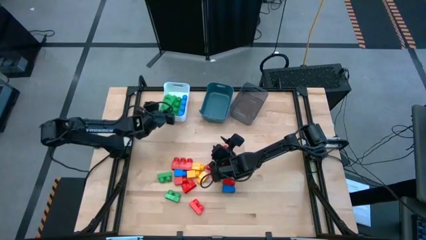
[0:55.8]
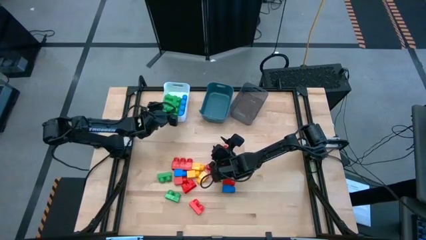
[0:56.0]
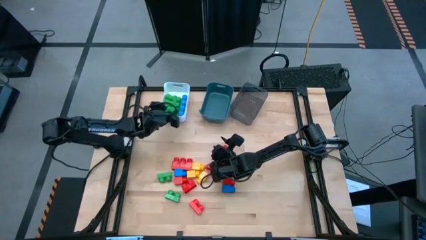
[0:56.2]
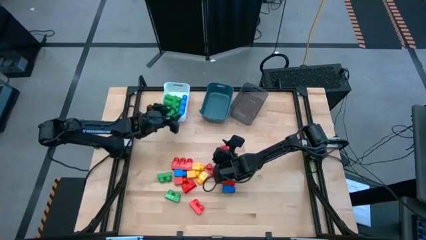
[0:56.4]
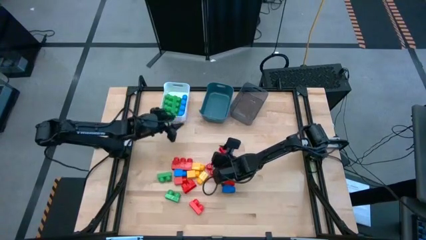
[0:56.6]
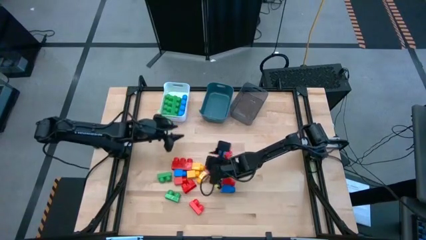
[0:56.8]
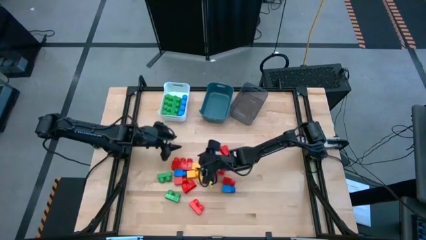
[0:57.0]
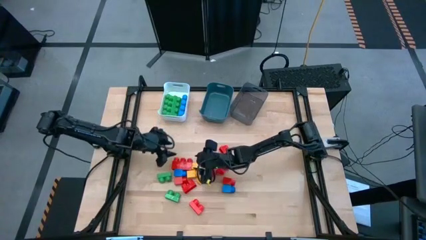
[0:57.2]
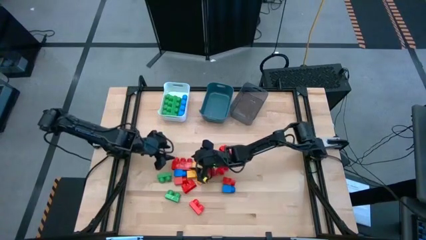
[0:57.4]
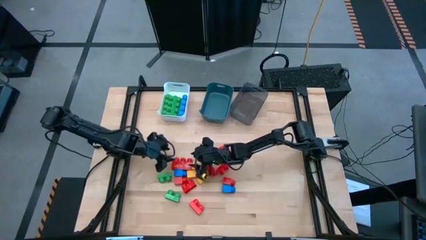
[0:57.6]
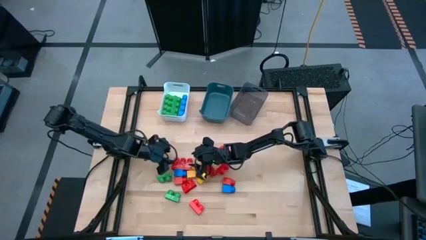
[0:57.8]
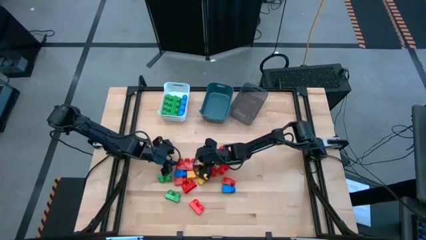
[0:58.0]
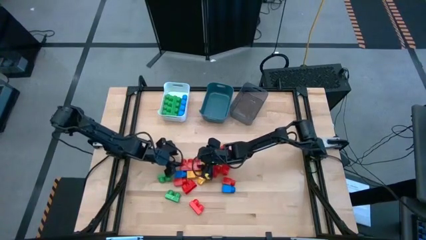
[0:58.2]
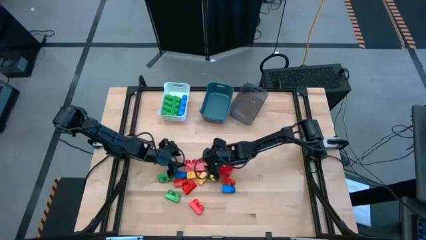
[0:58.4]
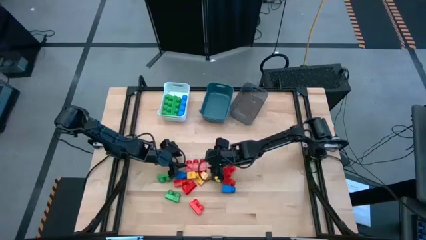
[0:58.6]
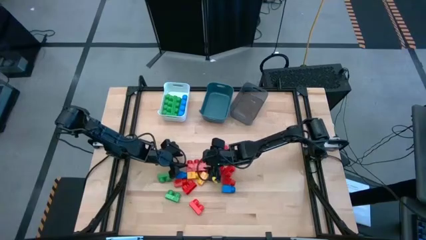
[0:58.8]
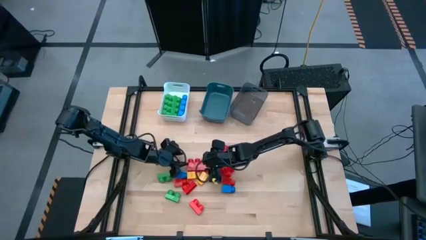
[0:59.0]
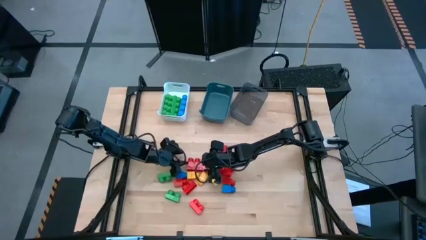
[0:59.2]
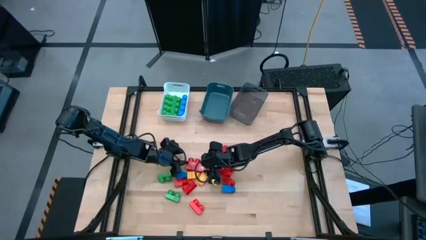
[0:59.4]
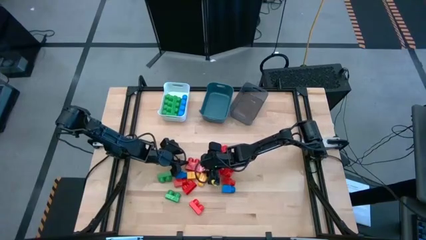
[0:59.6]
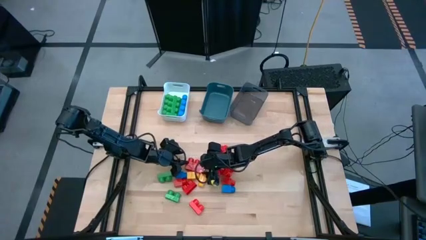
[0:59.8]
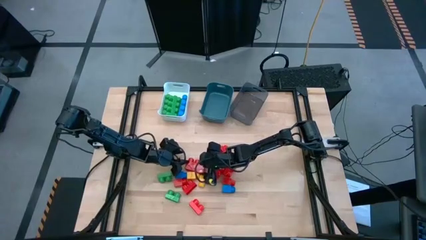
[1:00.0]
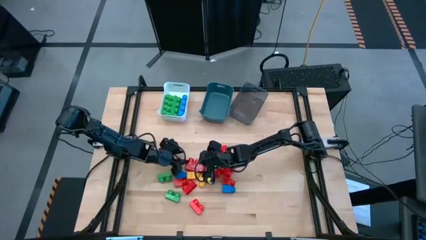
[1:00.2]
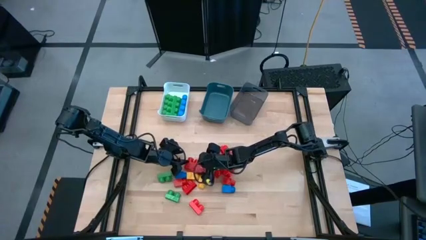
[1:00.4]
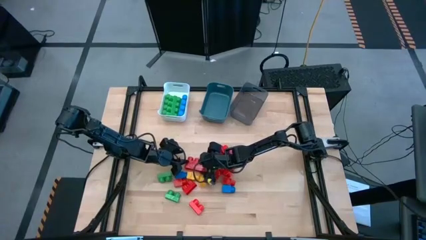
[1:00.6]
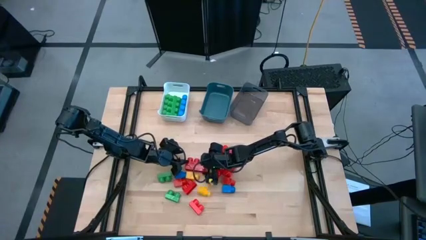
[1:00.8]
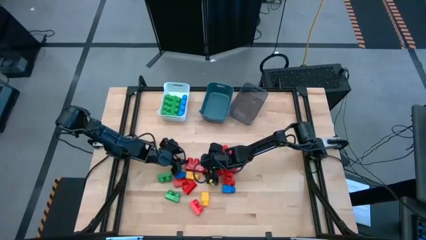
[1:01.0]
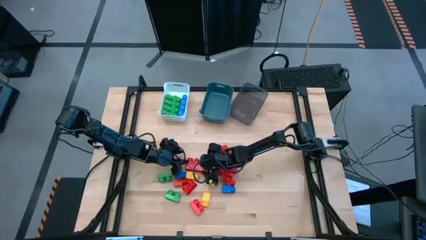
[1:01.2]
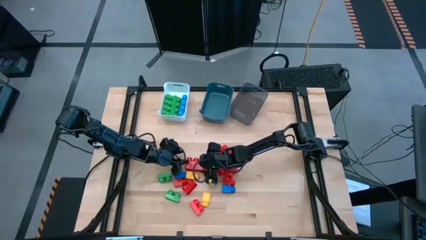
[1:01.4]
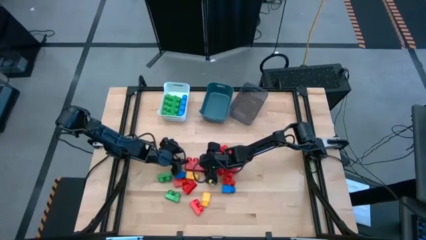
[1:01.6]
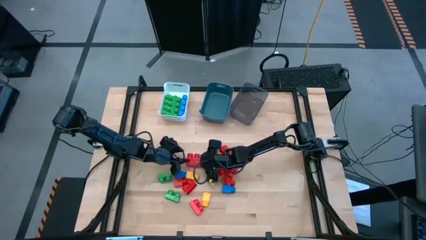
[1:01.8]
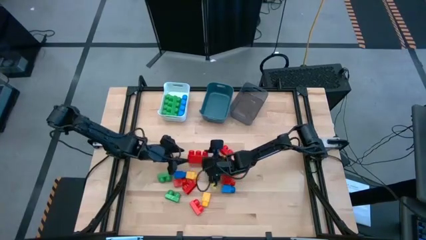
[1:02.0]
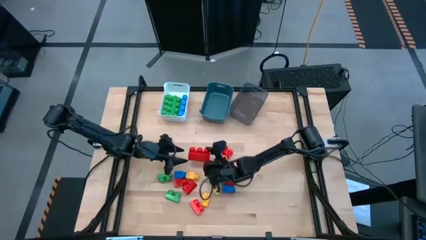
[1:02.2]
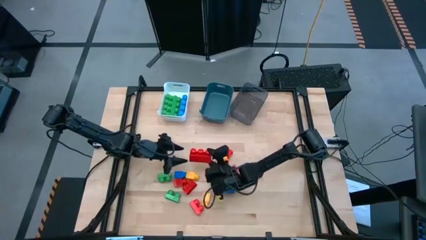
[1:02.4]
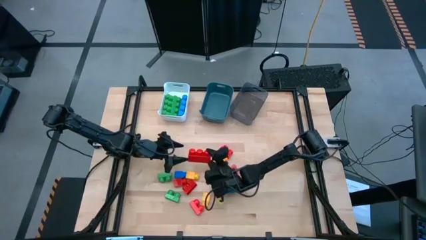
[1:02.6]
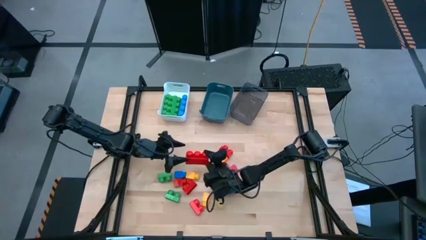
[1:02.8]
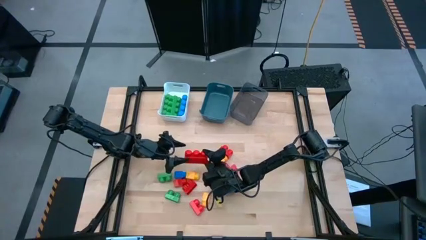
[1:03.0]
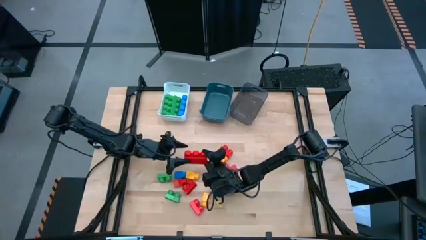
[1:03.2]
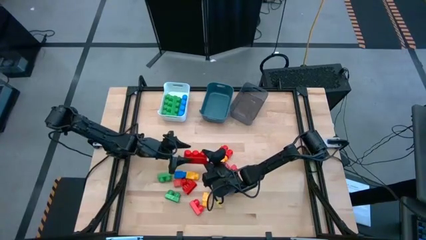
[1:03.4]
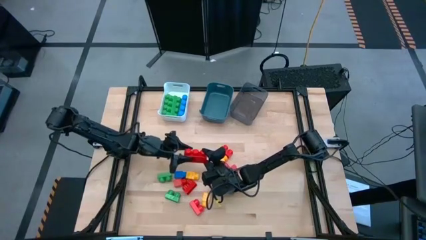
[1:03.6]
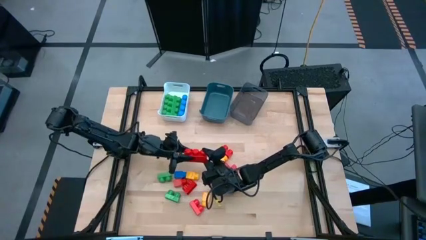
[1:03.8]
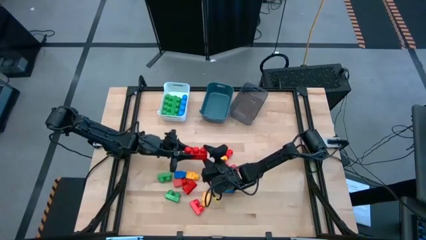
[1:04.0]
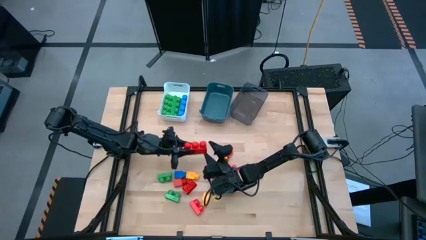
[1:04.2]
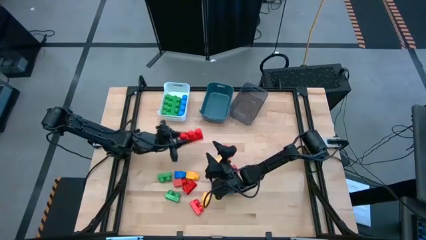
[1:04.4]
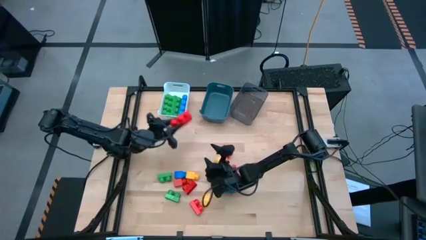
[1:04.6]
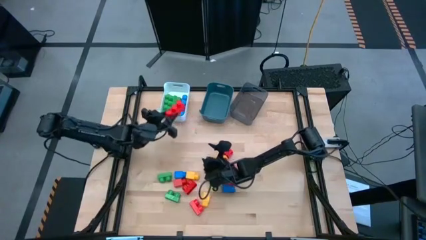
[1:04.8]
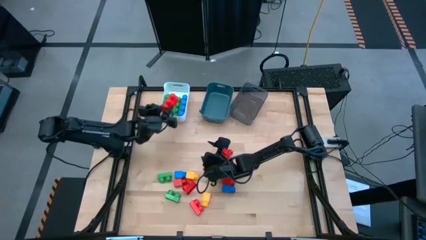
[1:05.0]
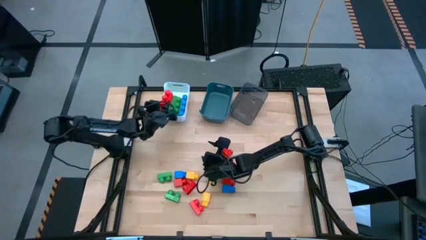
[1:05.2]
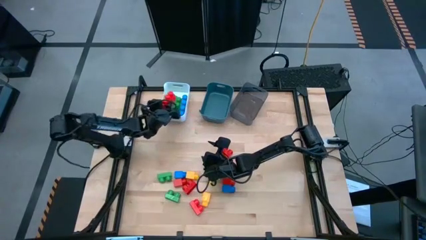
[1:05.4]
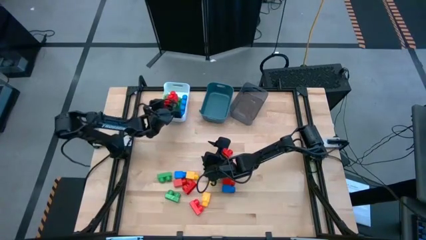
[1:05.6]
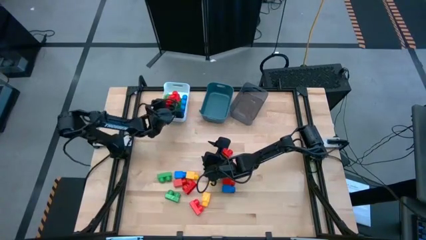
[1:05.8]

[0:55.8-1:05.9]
Task: Sort blocks by size
Put the 3 studs red game piece into the white bin

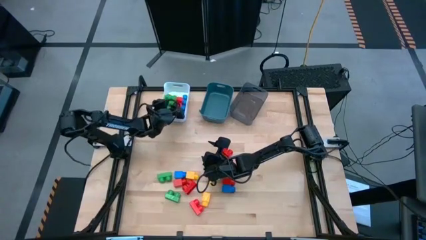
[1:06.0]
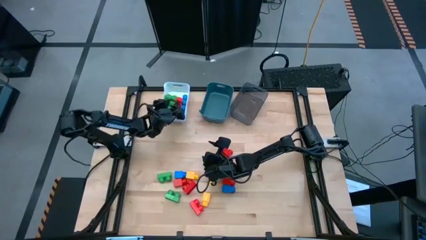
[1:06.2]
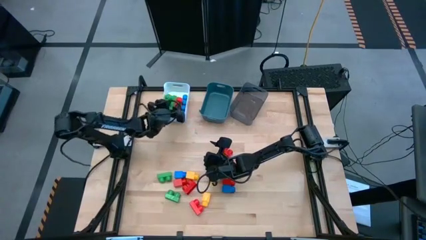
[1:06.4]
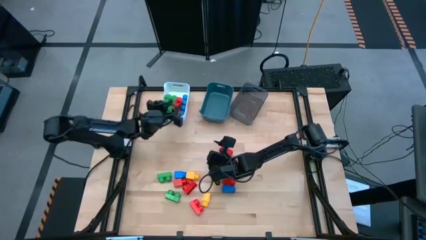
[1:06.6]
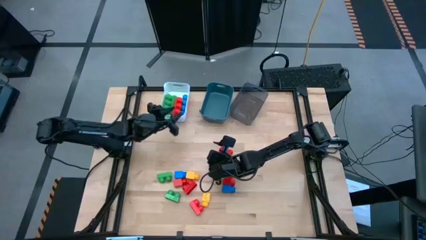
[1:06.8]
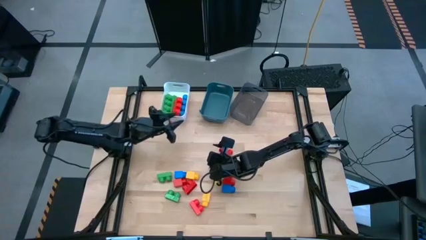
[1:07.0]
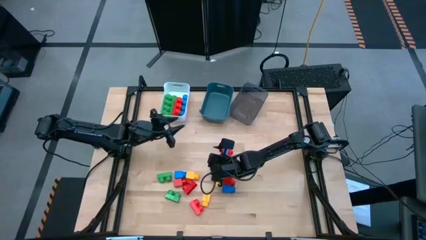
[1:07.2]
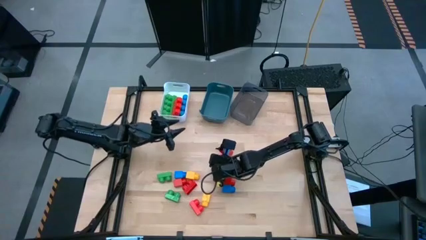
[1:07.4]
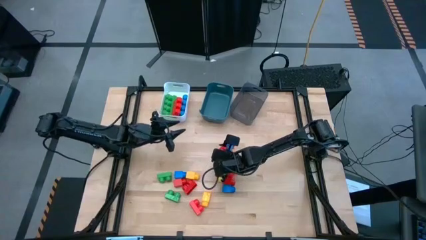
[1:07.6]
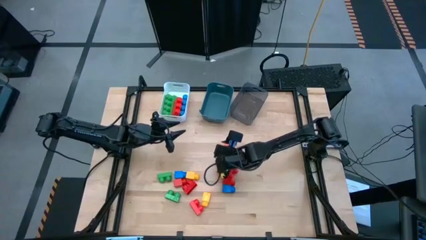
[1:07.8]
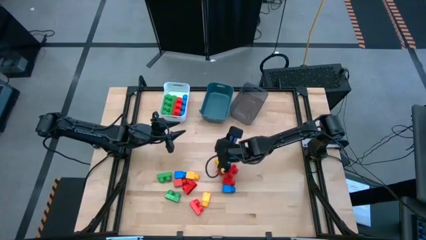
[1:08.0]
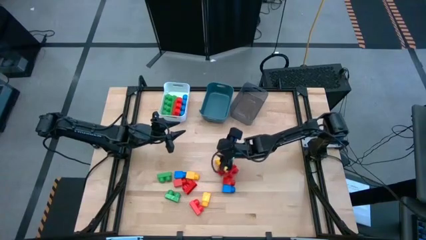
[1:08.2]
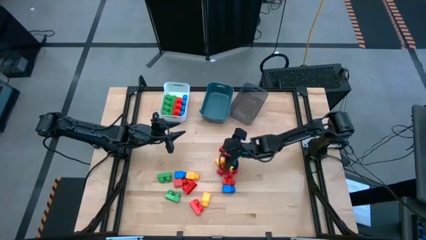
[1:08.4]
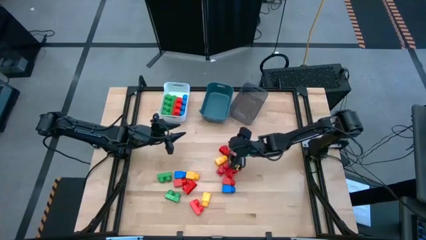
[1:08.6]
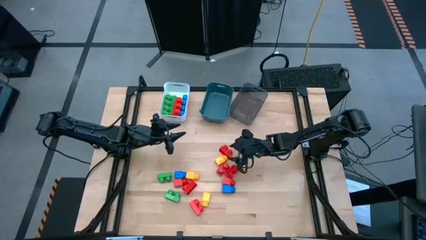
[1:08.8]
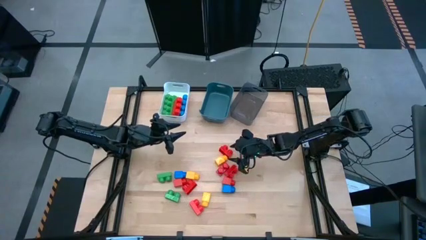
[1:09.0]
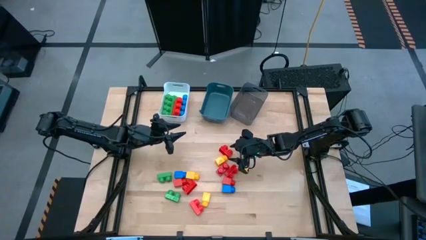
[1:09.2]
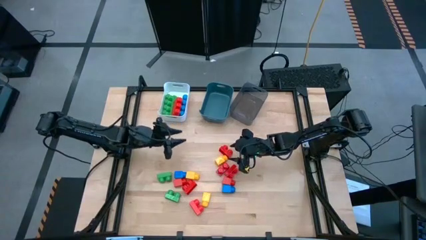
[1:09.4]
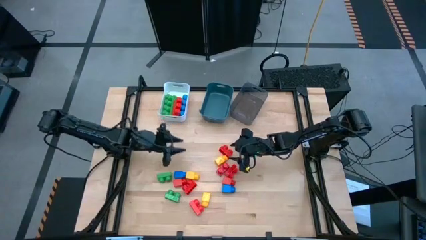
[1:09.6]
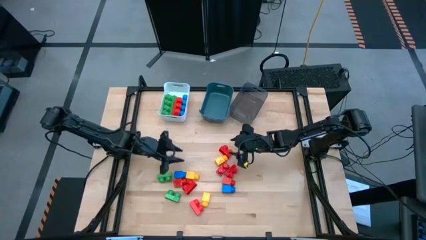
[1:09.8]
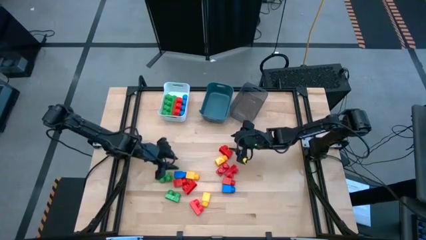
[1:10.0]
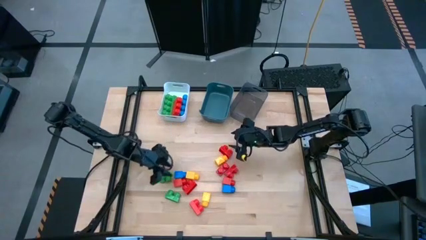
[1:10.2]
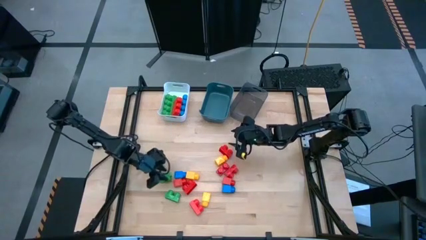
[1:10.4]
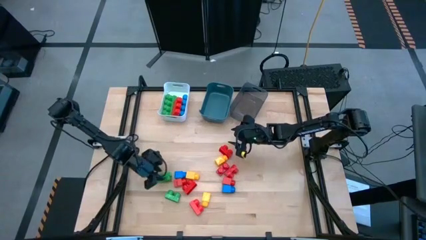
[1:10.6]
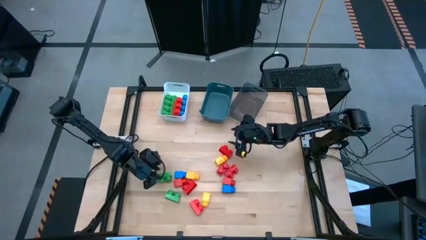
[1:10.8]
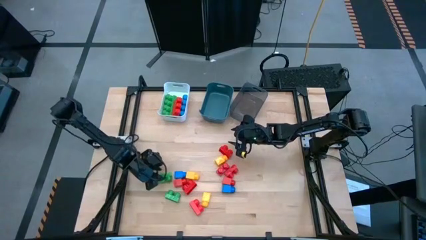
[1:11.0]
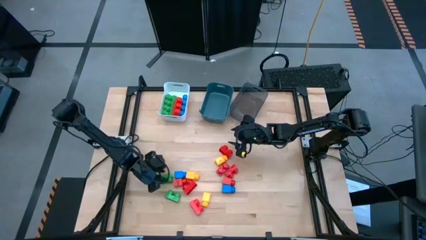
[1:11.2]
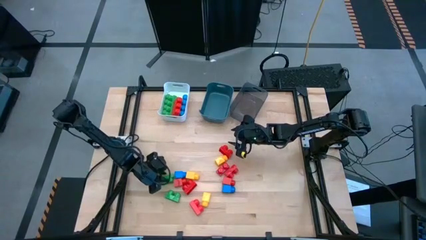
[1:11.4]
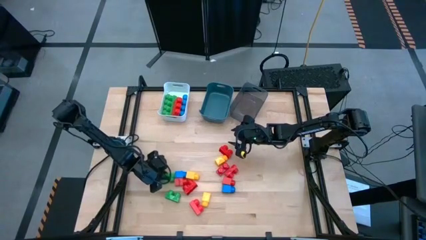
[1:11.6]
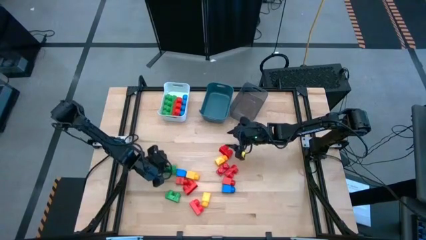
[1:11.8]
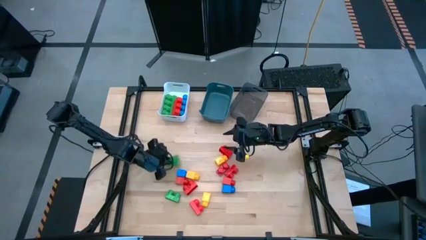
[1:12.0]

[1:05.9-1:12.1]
Put the 2 studs green game piece into the blue bin
